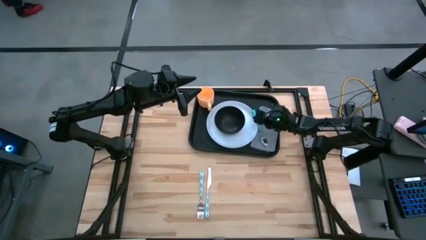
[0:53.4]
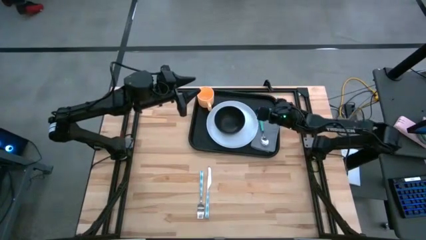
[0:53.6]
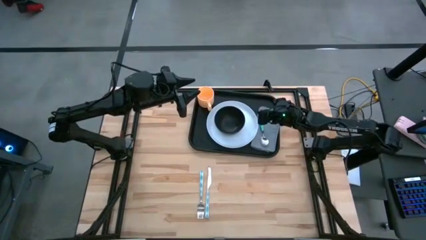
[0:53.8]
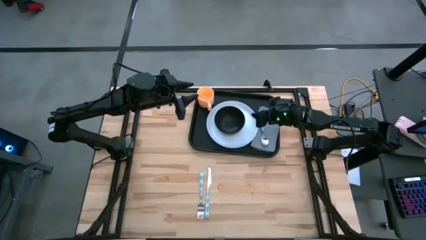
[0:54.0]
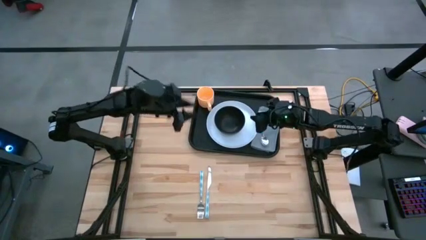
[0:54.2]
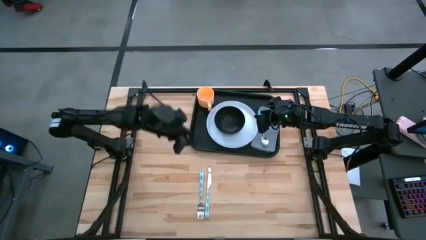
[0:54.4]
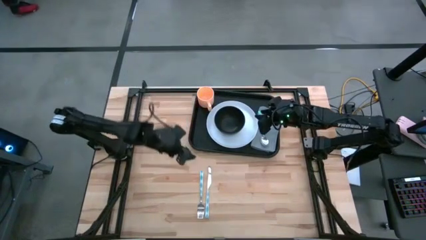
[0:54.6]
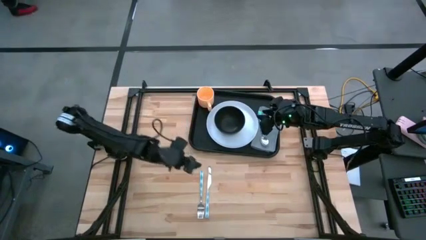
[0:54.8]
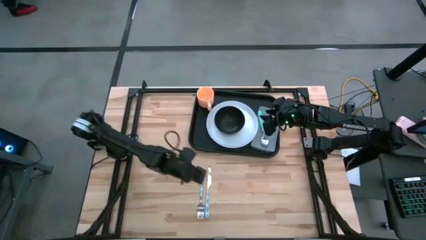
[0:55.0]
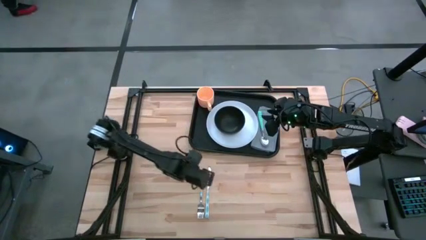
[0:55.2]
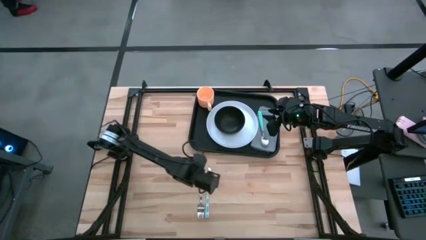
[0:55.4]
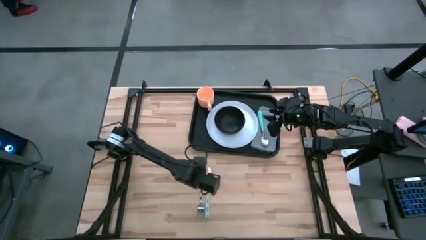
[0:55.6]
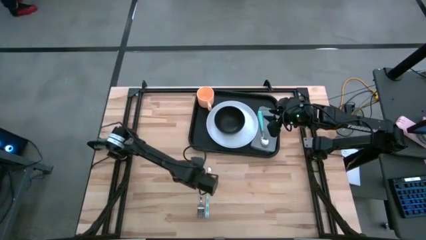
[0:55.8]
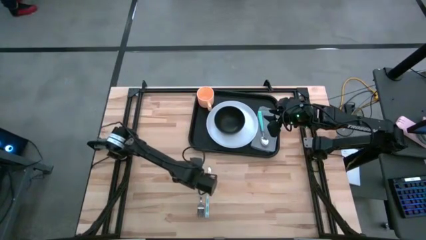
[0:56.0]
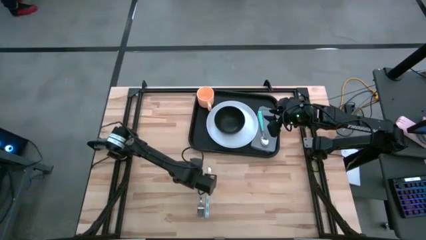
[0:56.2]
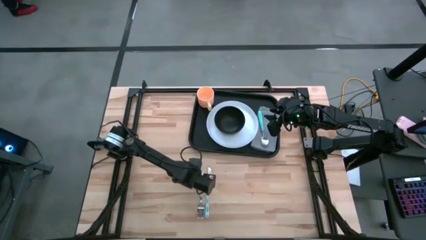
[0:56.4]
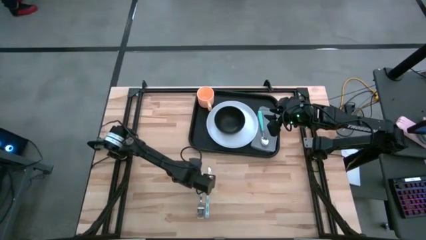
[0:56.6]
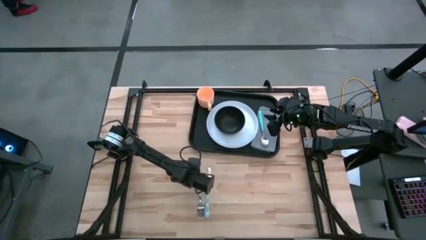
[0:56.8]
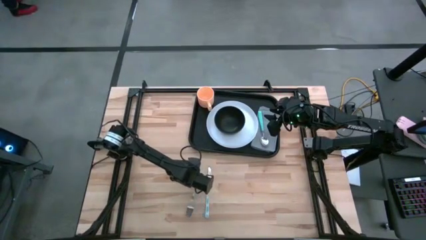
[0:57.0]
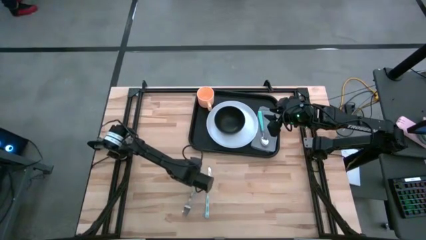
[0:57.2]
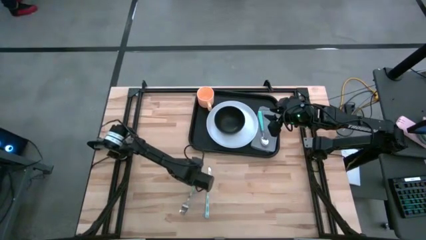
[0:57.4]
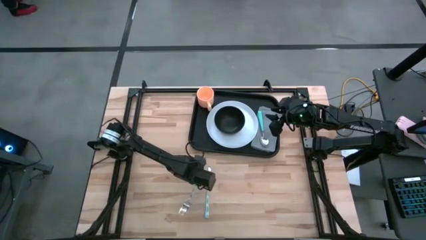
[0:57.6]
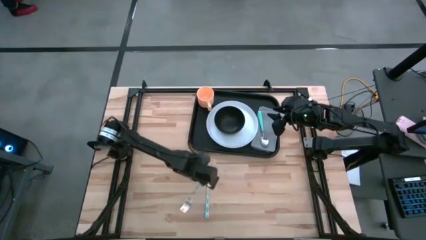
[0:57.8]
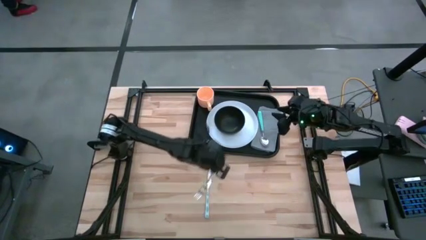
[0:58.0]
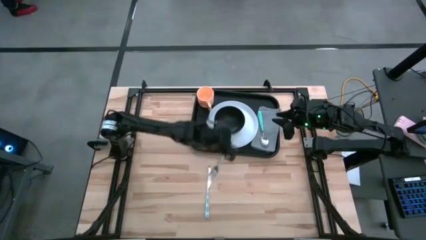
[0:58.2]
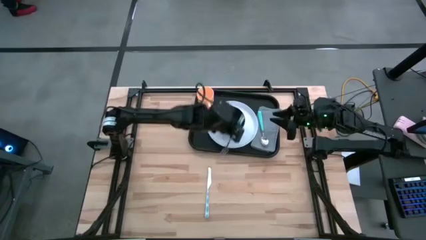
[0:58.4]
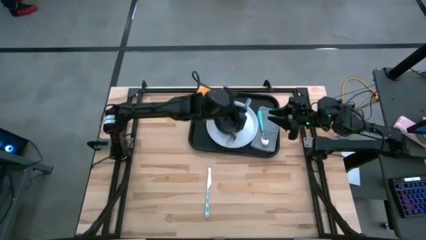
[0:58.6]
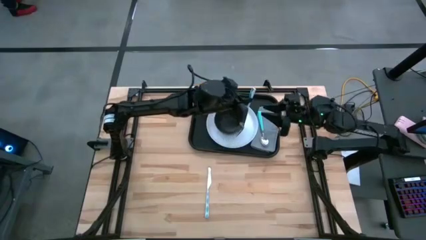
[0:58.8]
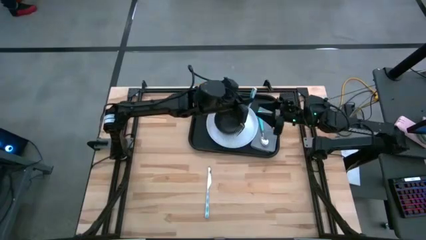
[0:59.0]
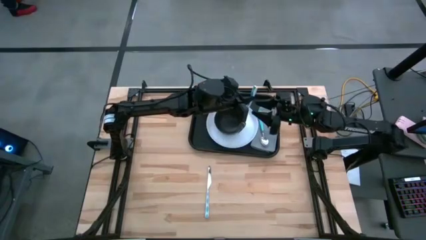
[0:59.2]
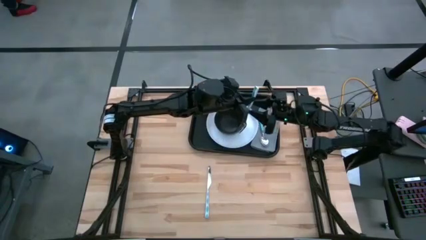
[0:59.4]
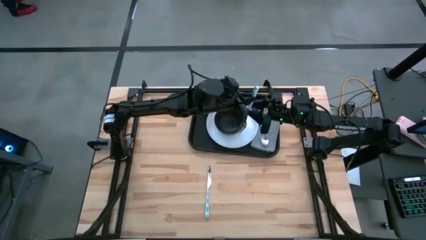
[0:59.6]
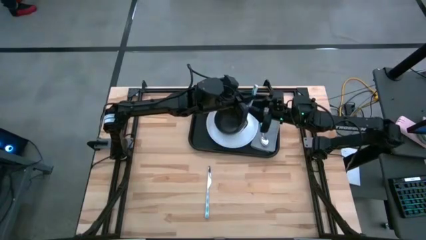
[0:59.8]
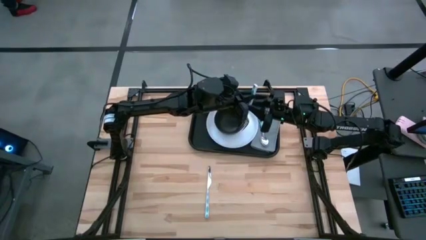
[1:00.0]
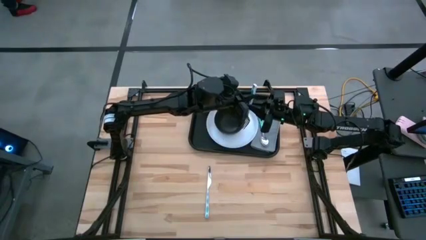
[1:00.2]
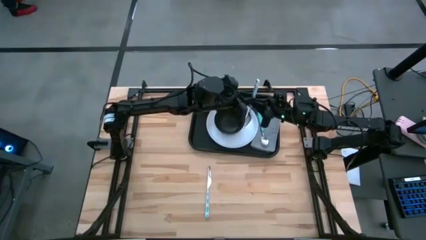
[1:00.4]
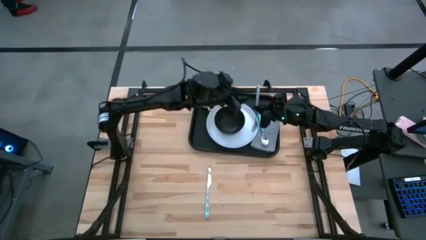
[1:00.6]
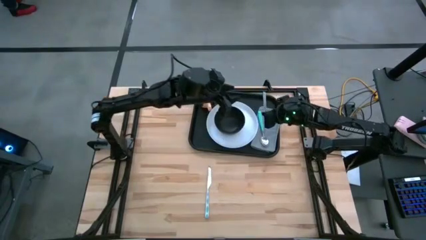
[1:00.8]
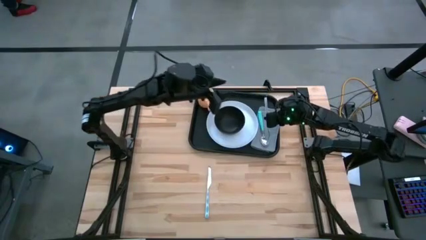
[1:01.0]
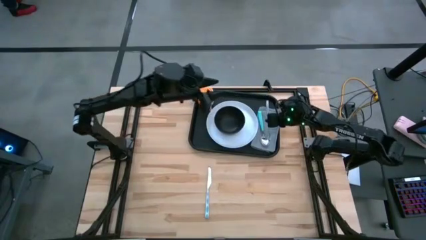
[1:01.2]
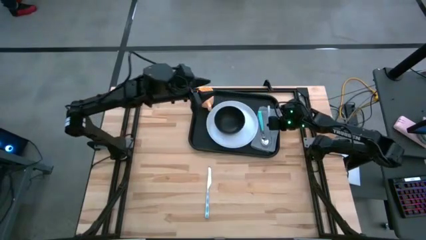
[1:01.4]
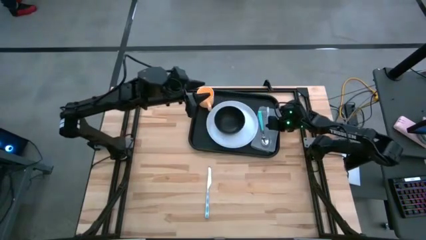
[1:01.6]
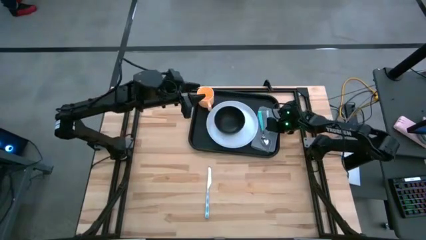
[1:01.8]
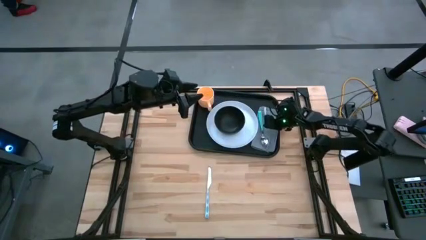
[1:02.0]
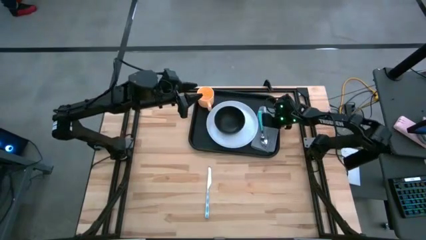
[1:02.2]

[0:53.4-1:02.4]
Task: Set up tray
Put the green and white fork on the gray napkin to the right of the green spoon on the black tray

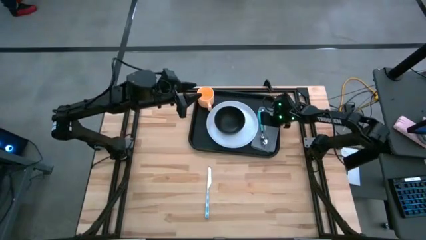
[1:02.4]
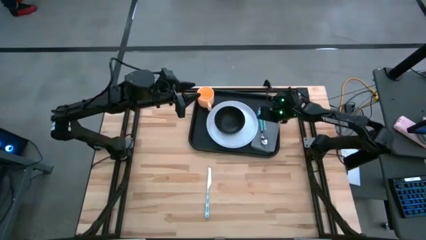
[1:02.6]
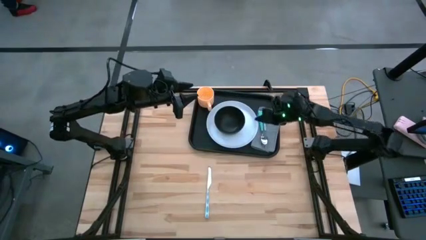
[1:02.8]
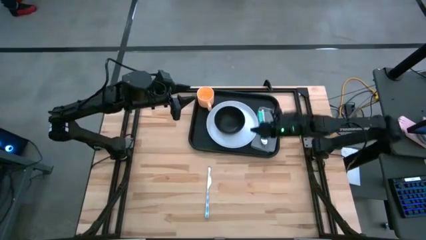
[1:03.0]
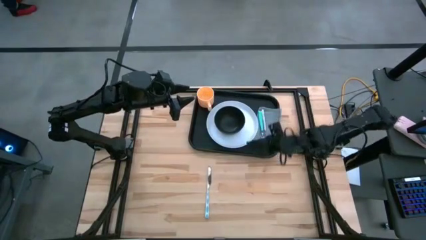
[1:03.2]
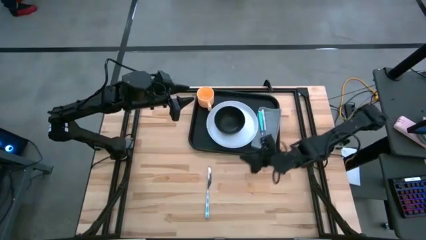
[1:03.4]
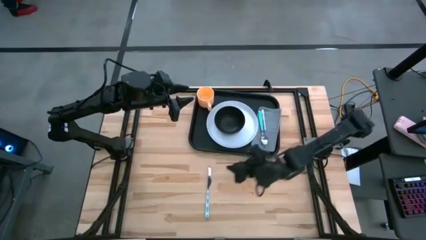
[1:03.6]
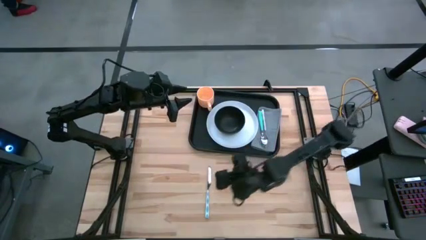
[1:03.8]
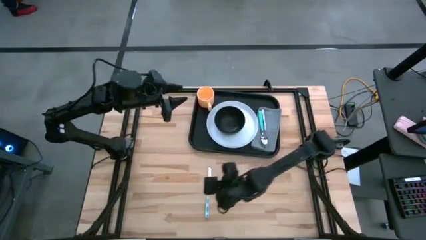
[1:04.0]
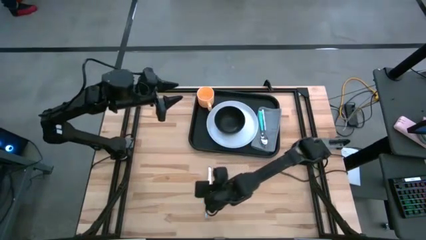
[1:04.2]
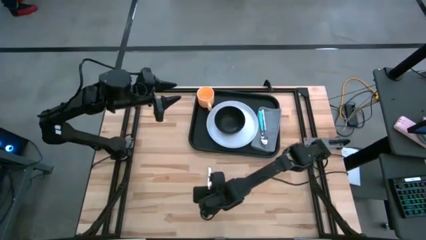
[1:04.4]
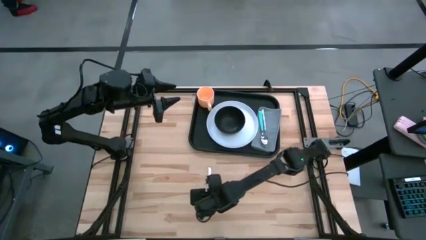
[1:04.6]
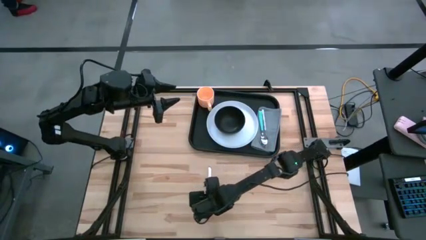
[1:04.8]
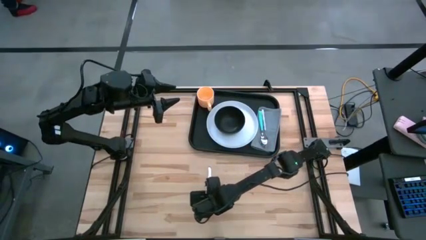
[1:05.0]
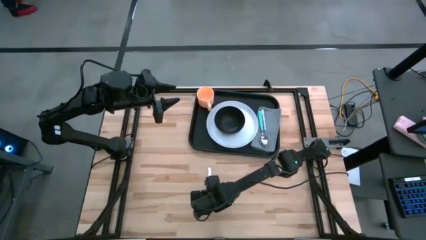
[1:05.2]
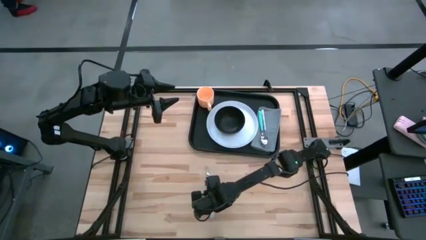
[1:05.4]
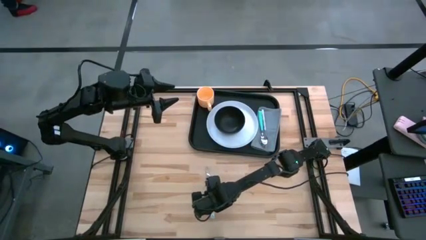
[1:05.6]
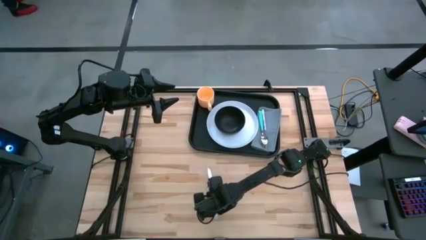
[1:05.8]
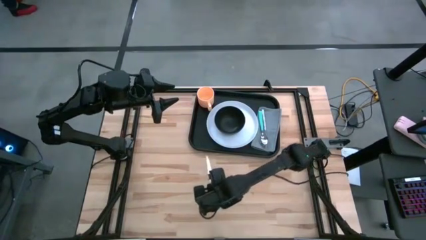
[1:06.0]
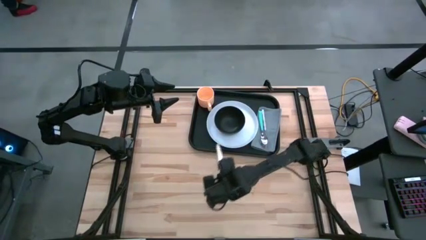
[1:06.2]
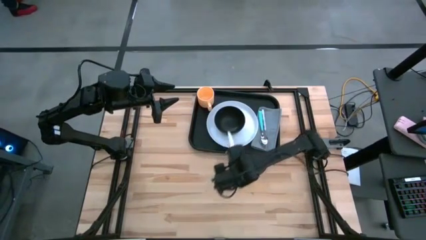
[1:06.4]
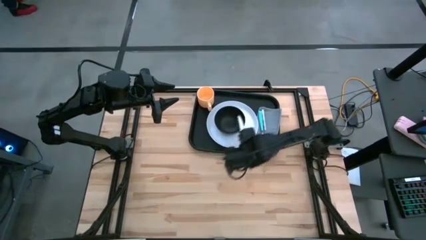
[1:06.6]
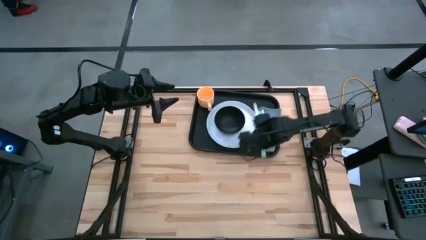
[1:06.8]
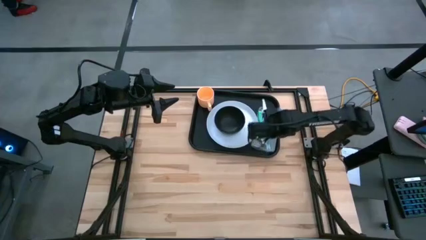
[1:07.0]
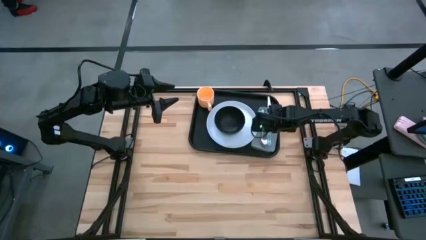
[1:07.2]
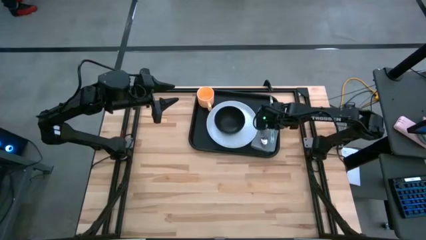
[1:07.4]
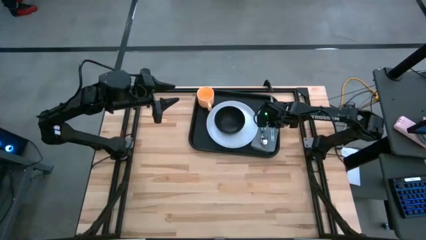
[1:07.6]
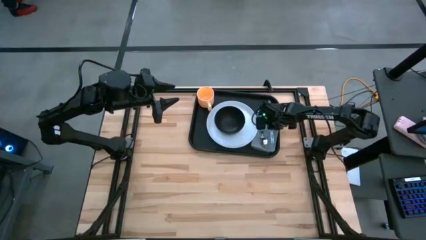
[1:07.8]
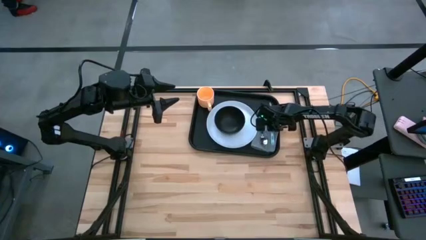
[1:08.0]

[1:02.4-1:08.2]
Put the green and white knife on the gray napkin to the right of the green and white fork on the black tray
